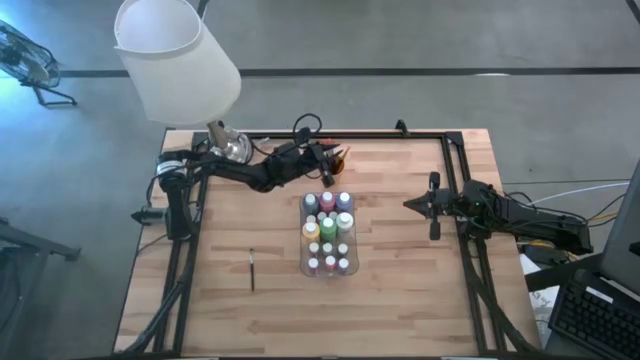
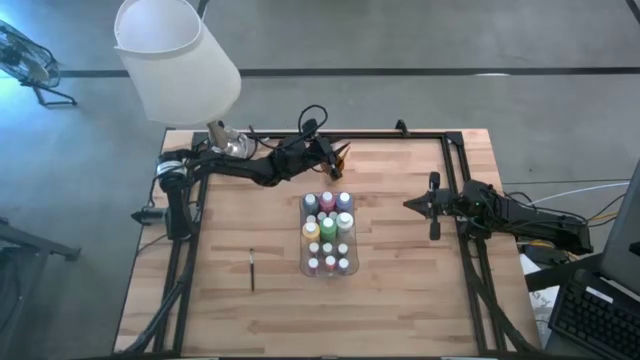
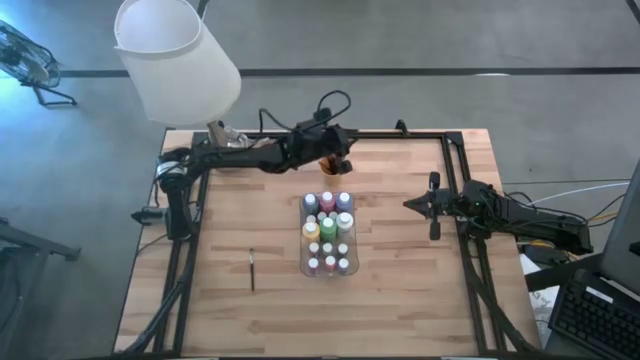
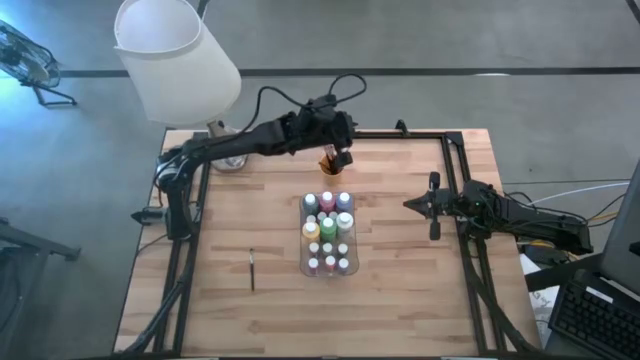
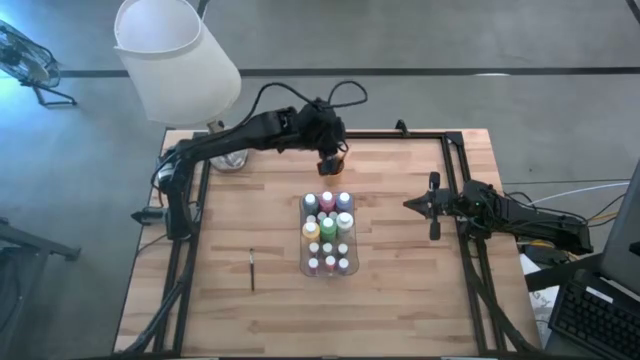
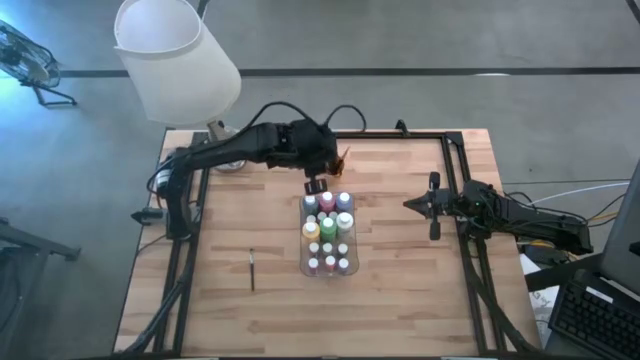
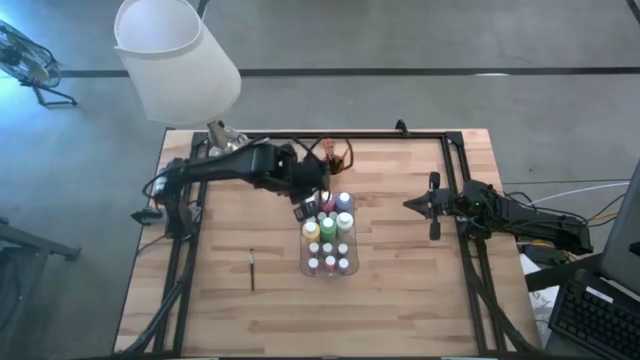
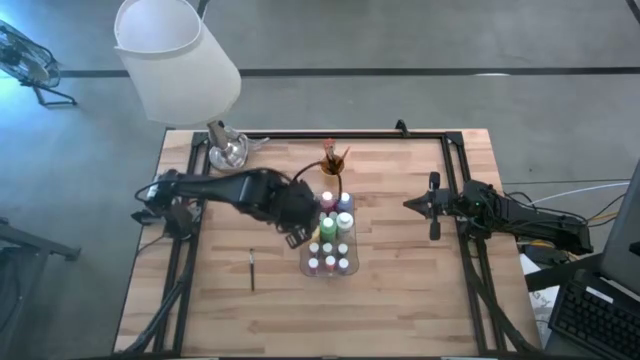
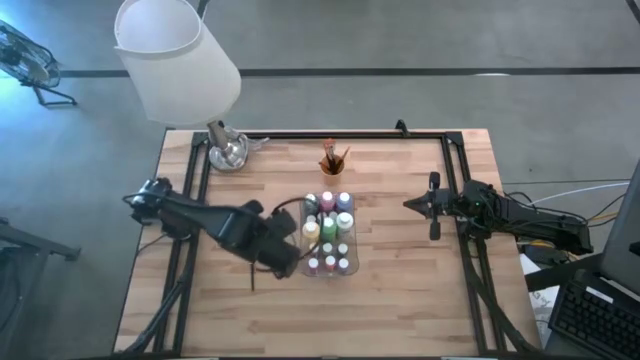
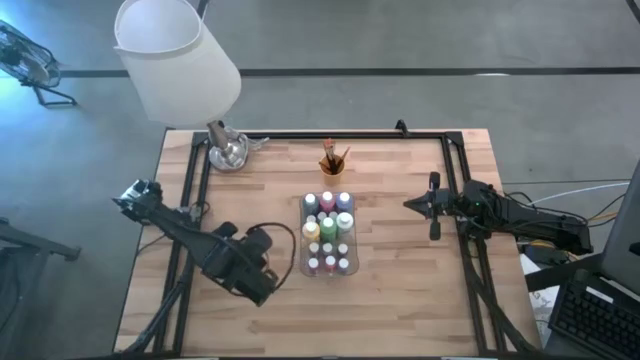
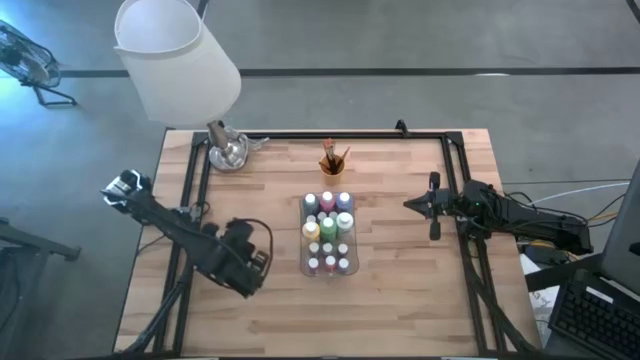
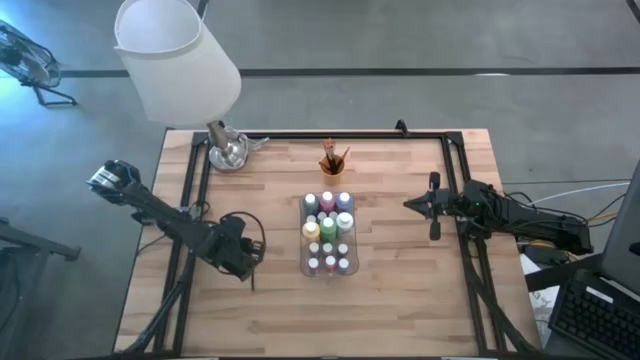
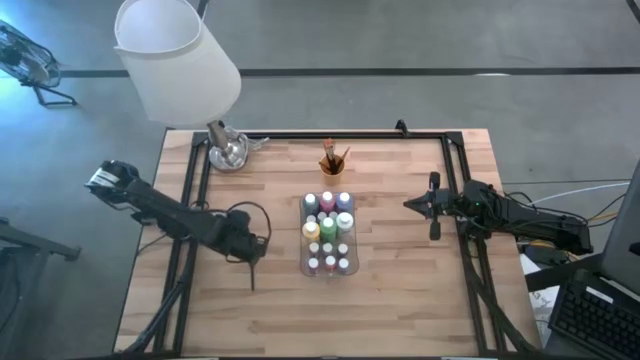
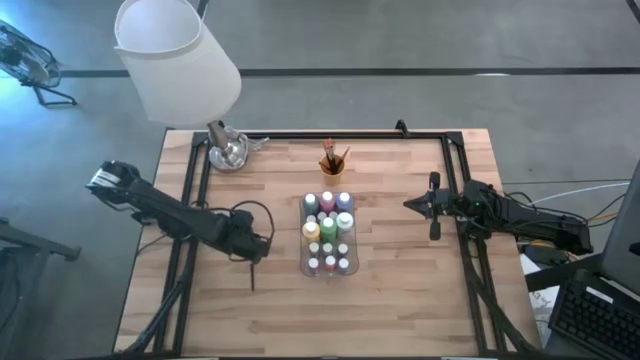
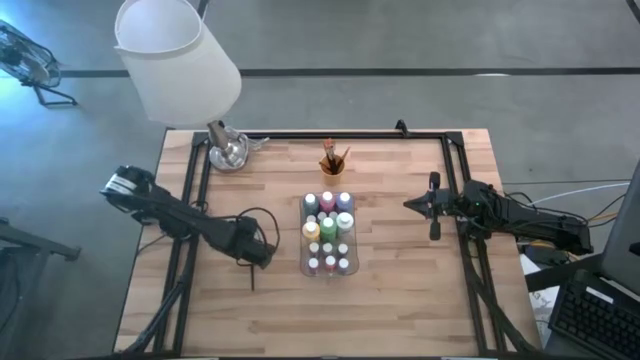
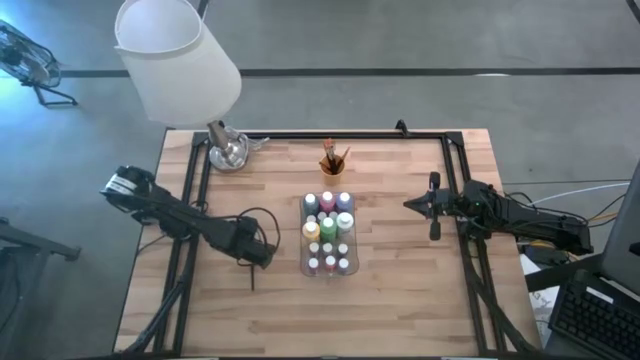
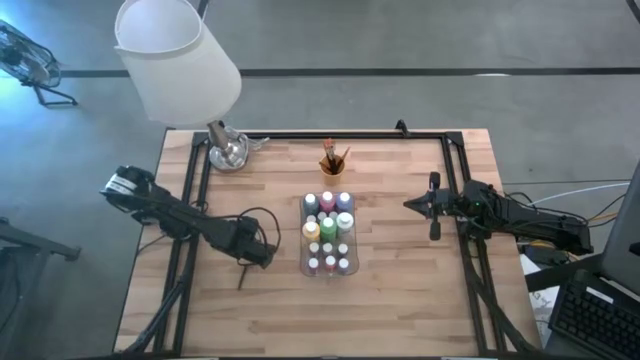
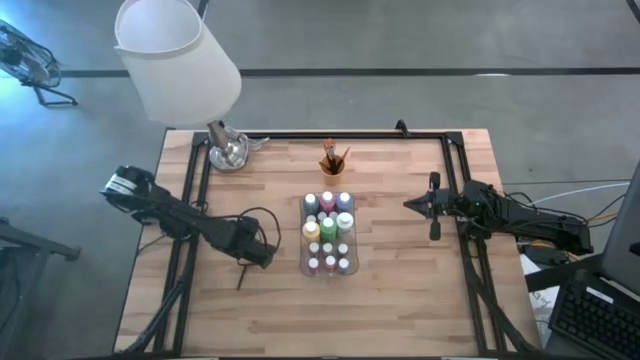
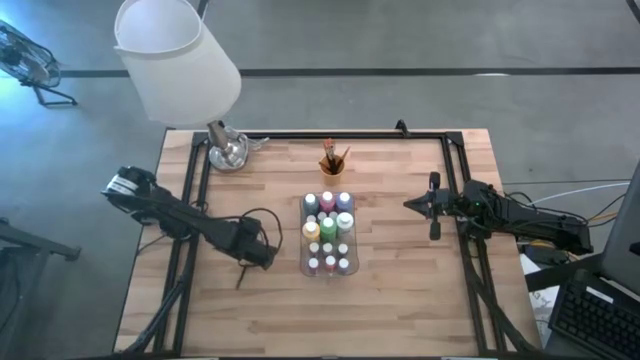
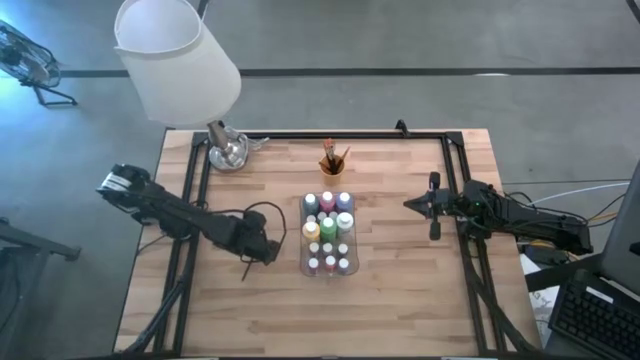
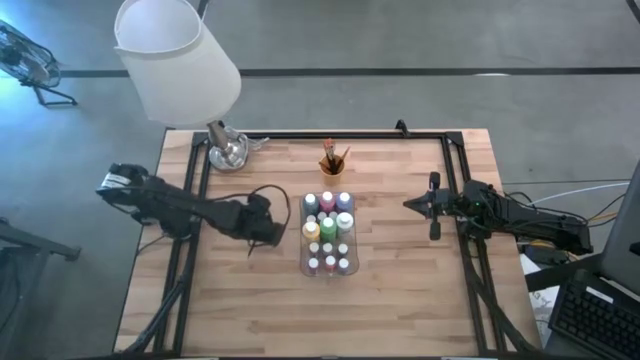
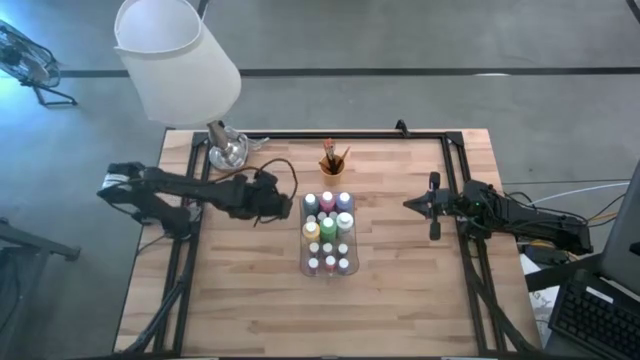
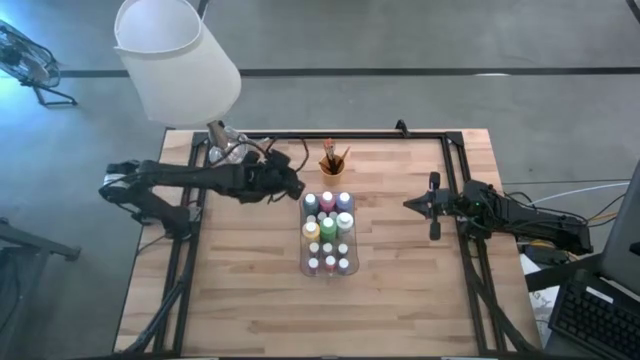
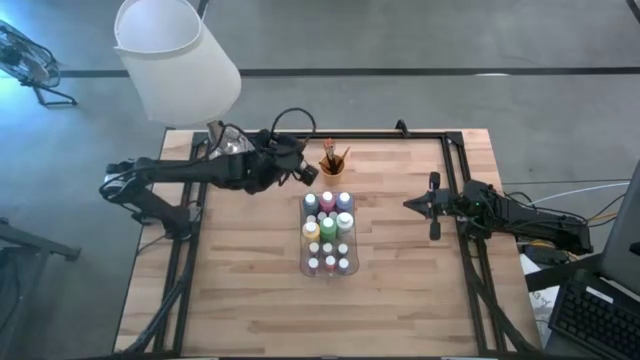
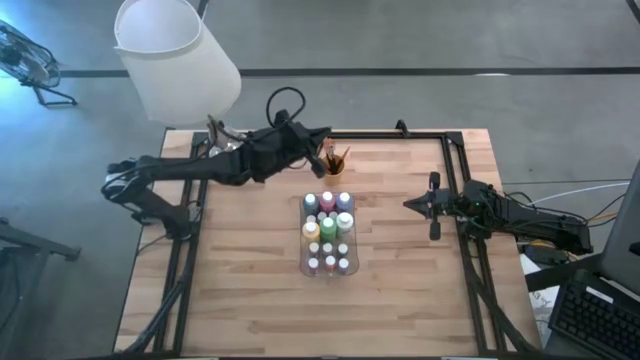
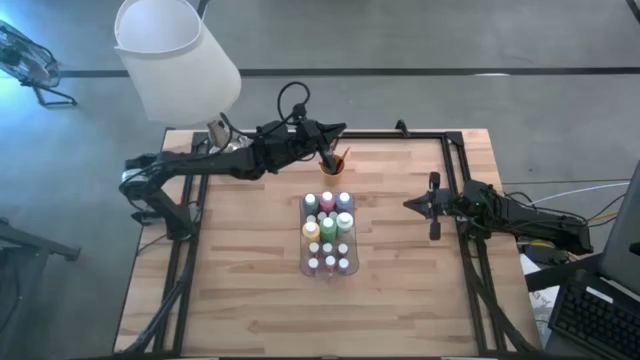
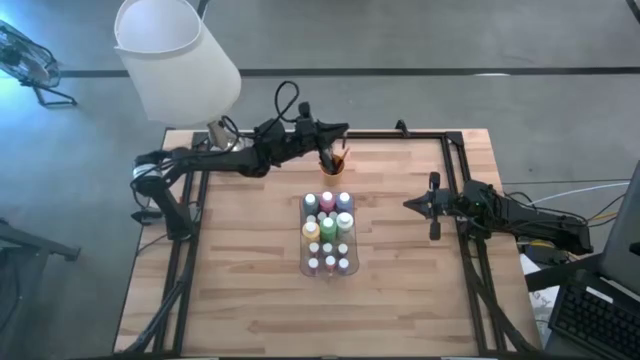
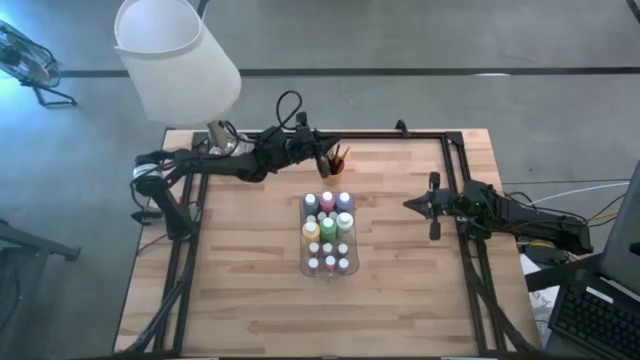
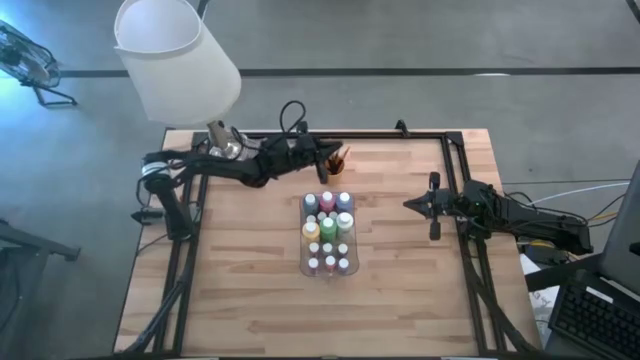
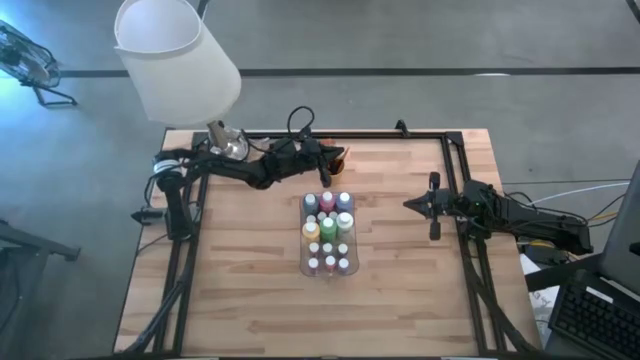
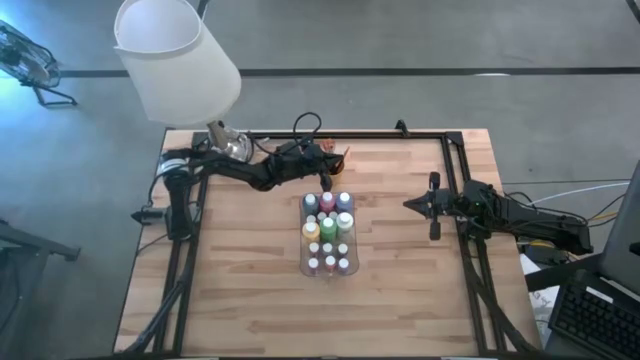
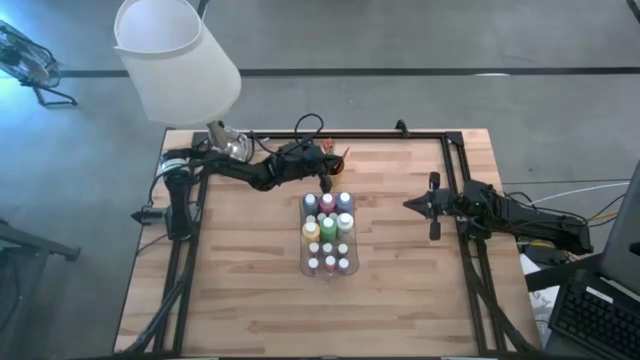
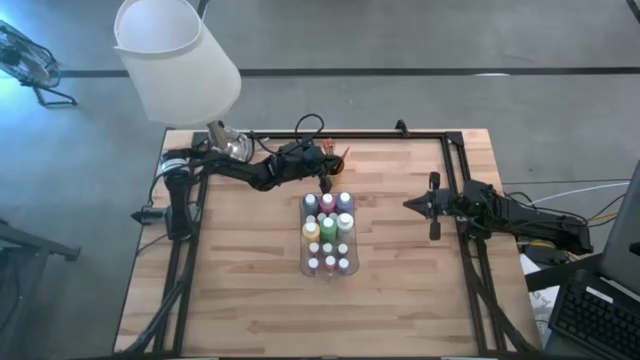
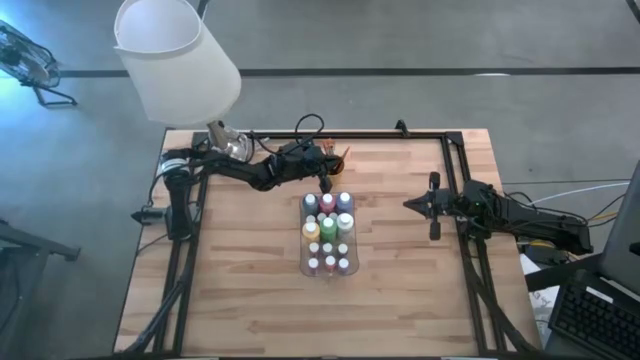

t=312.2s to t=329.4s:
Task: Pick & Place Paint Supplies
Put the gray paintbrush into the yellow cup

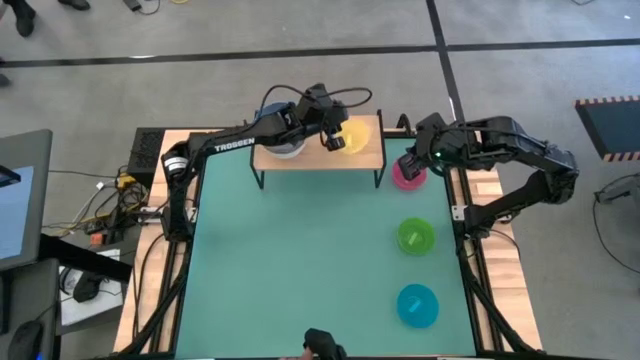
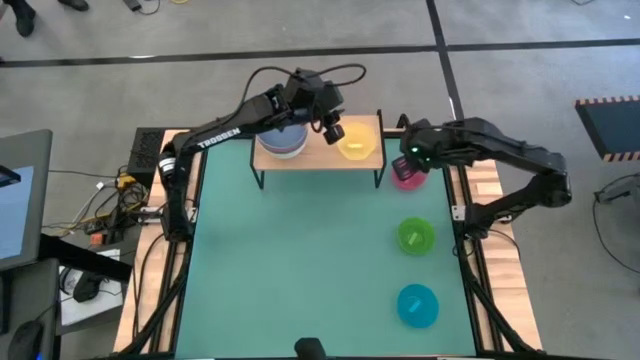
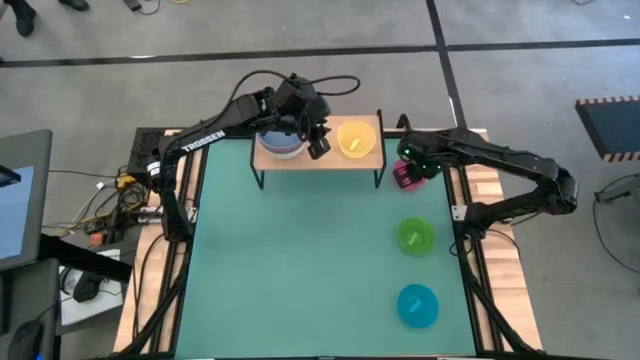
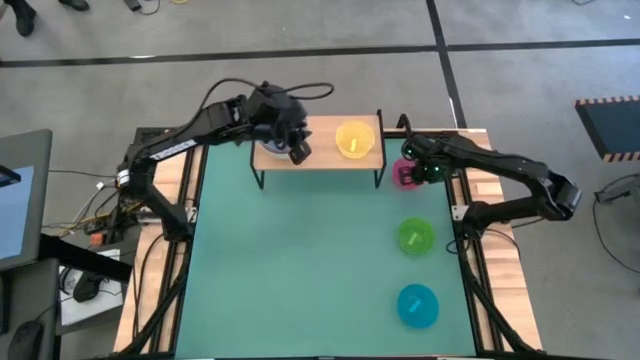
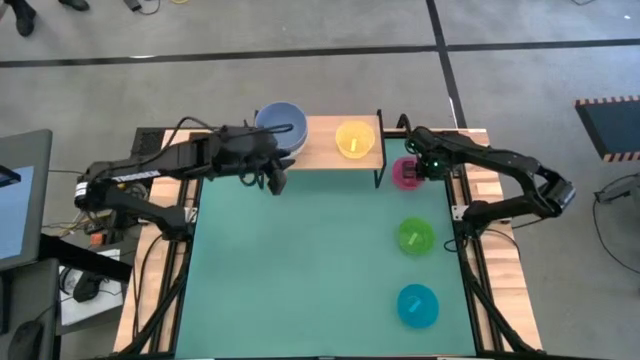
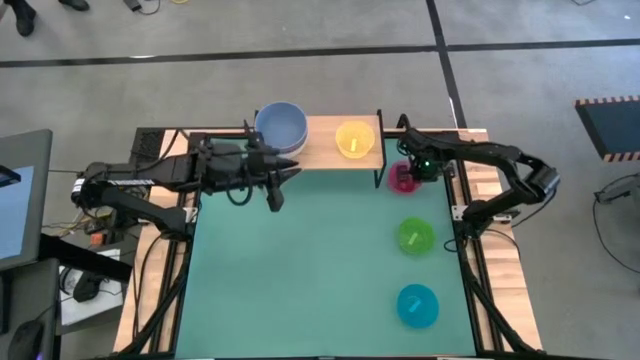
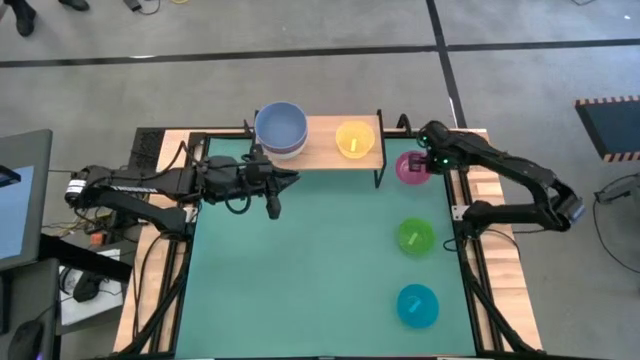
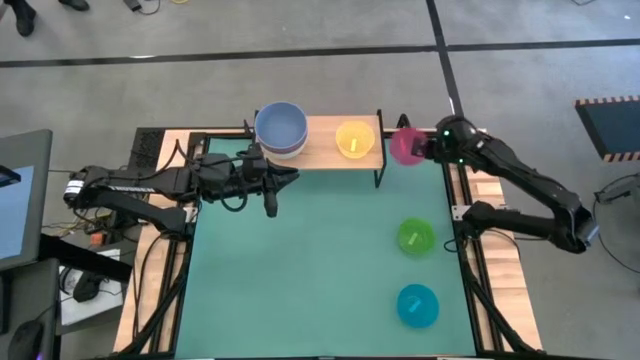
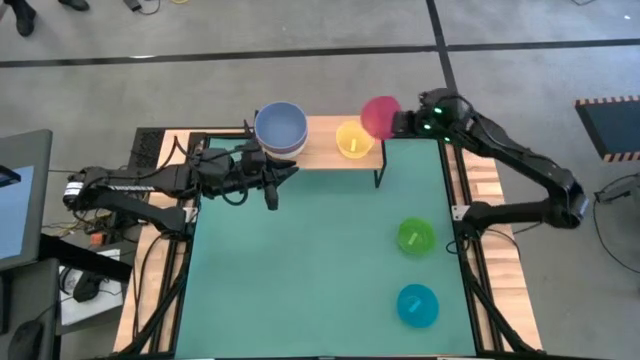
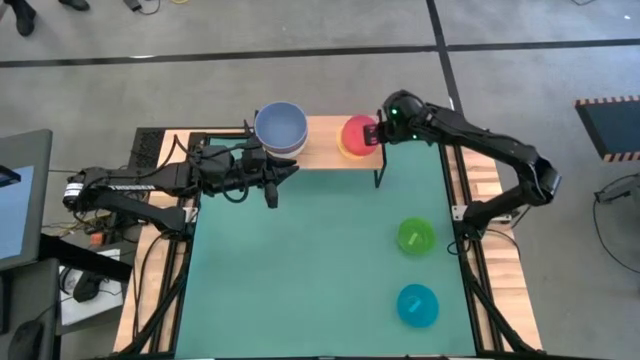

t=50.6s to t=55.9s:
Task: Place and stack bowls onto a shelf
Stack the small pink bowl on the small yellow bowl on the shelf

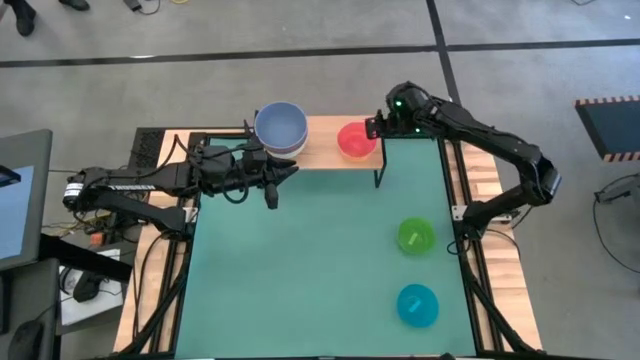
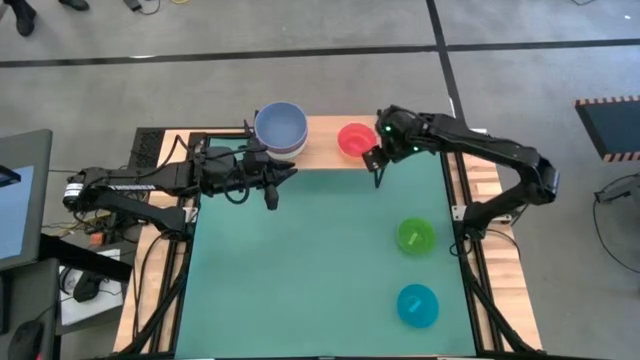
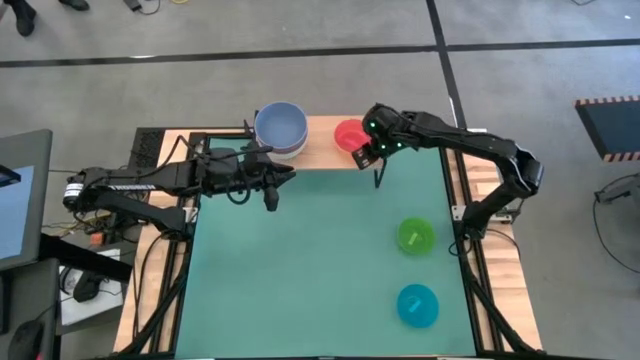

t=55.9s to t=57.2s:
Adjust the stacked bowls on the shelf
